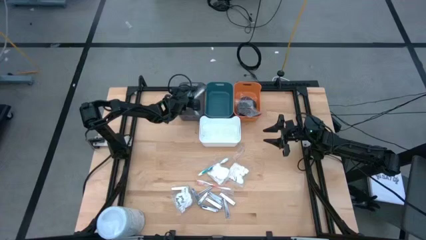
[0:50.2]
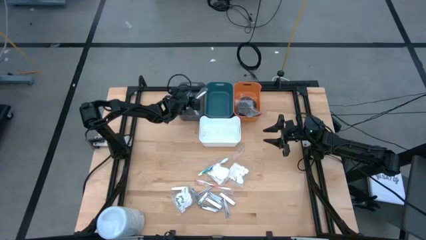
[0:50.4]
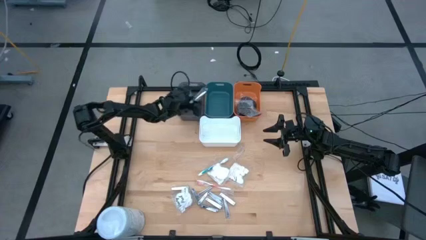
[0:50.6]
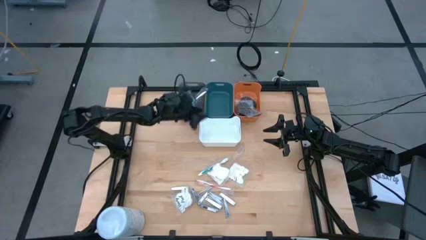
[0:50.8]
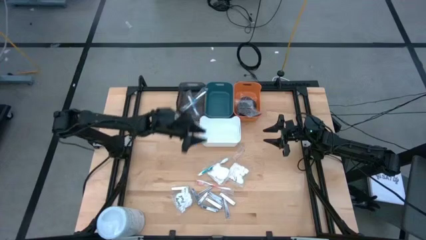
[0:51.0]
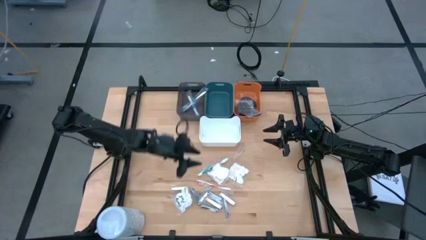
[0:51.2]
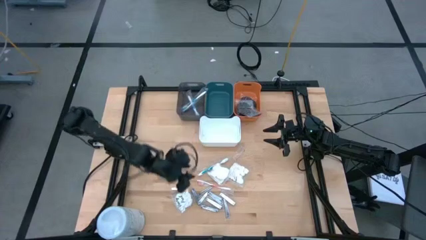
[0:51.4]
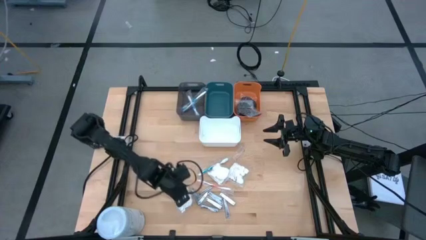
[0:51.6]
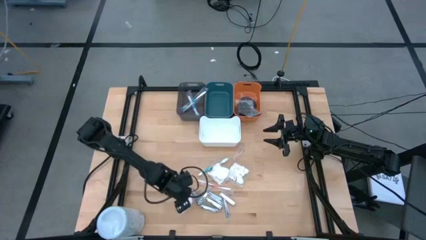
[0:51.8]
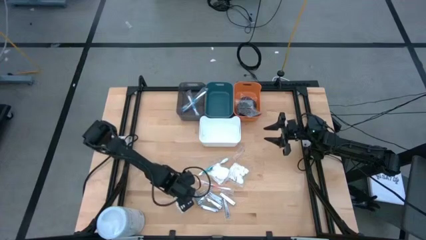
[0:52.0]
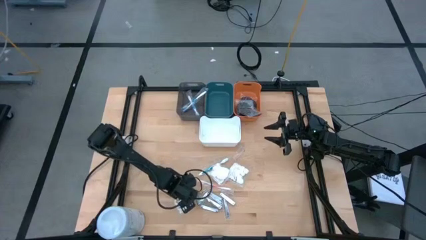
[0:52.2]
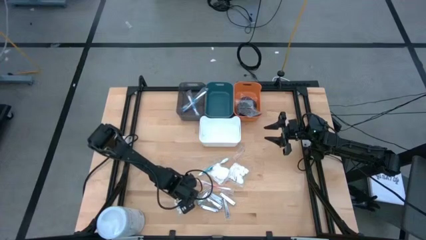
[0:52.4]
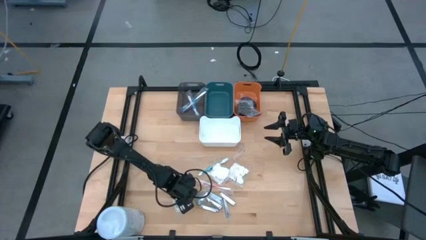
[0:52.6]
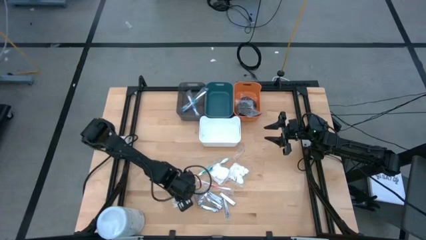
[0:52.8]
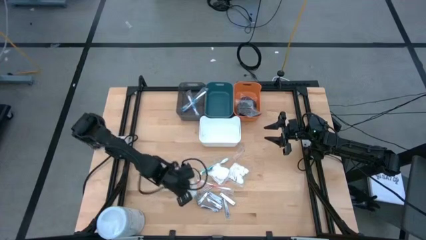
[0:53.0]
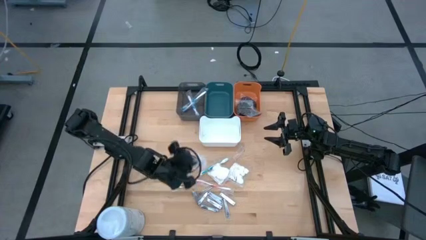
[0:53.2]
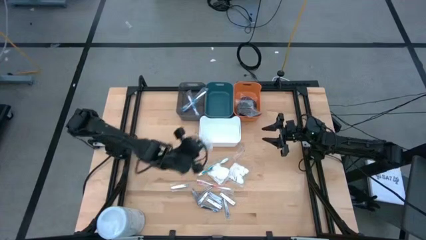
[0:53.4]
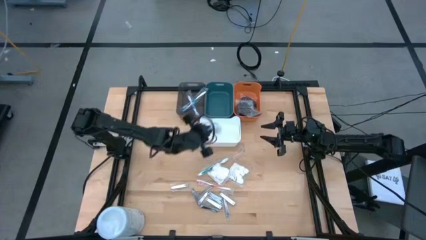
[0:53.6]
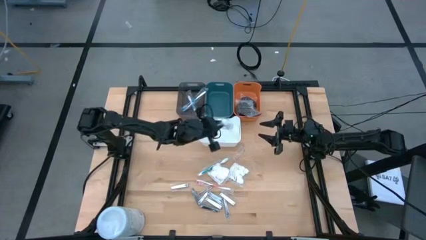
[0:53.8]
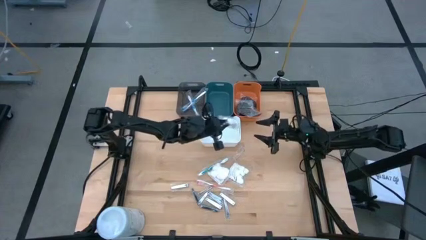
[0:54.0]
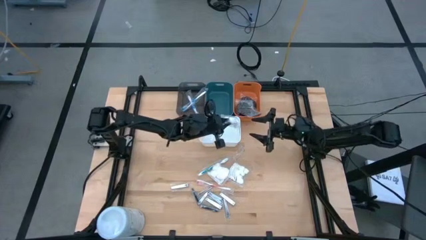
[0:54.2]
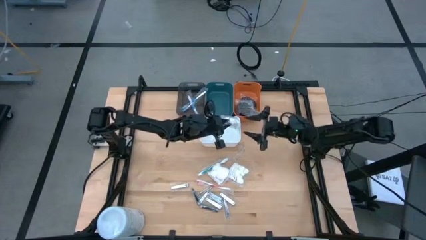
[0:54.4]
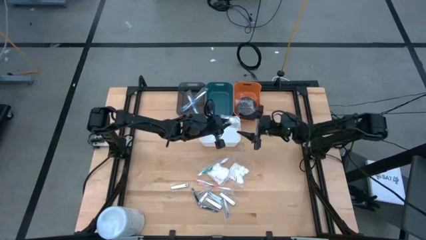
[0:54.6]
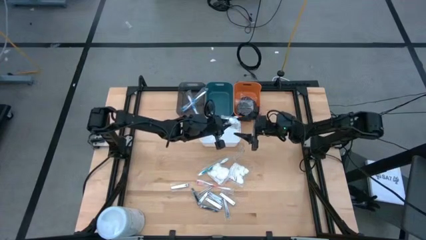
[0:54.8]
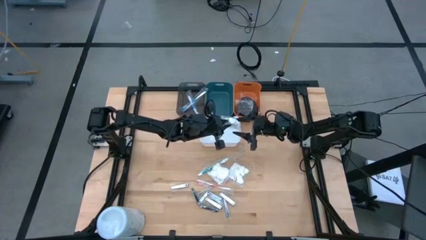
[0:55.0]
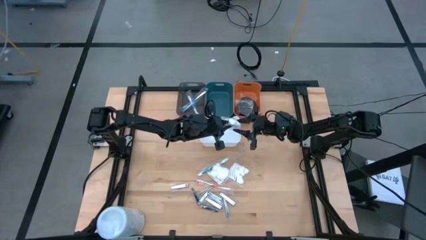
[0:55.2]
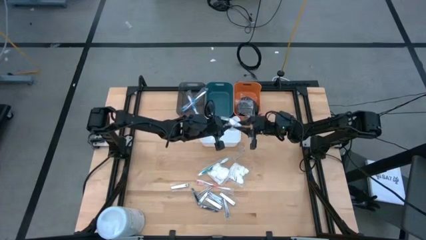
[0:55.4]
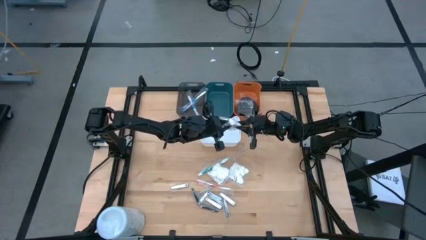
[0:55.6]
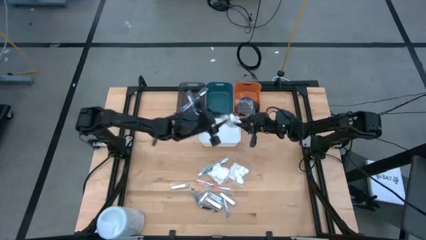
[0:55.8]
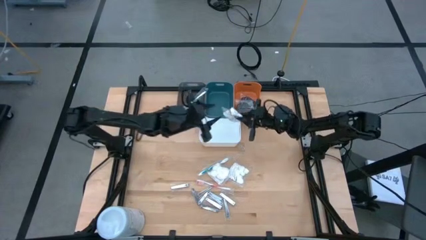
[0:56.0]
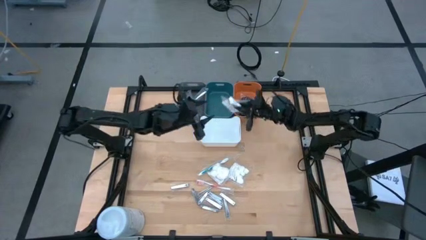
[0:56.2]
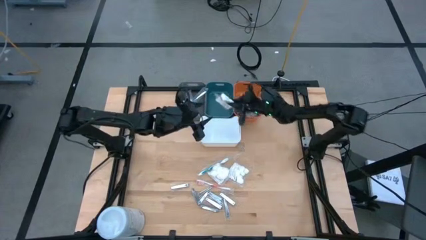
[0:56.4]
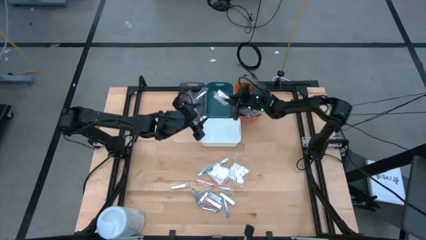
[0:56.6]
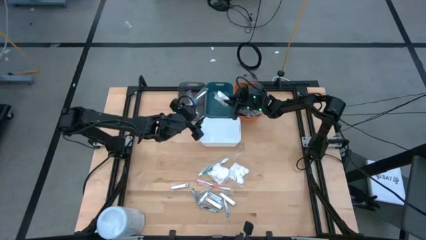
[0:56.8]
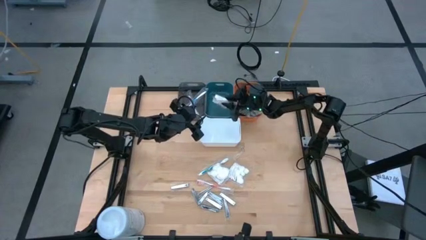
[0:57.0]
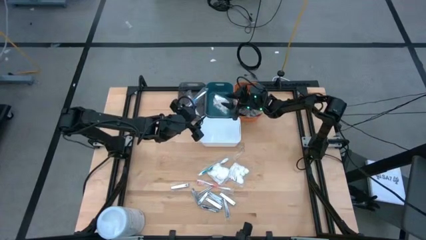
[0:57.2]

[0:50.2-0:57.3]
Task: Pick & Place Travel size toiletries
Put the cotton pack into the blue bin

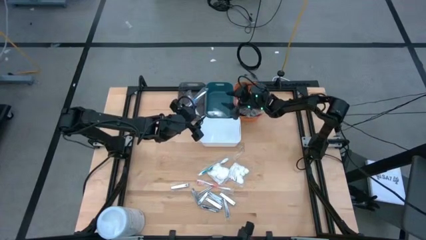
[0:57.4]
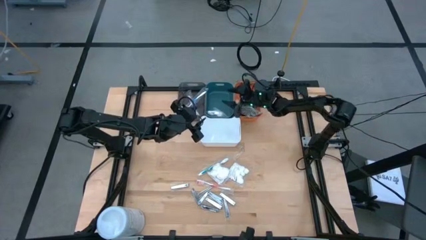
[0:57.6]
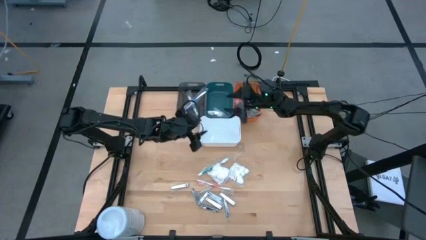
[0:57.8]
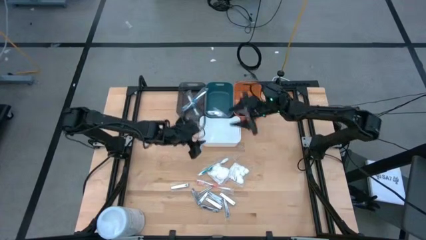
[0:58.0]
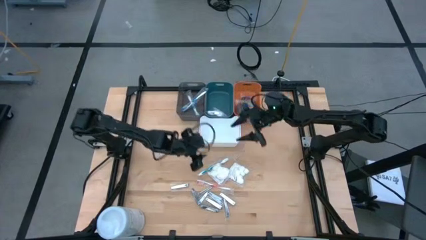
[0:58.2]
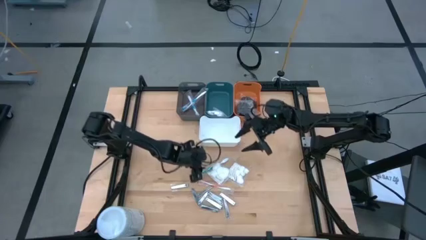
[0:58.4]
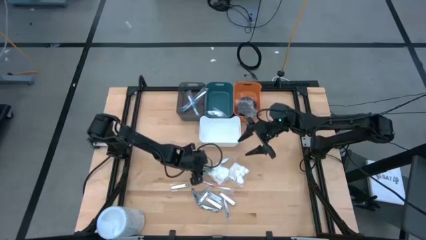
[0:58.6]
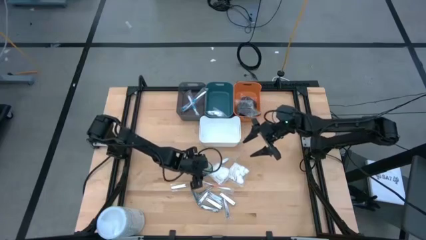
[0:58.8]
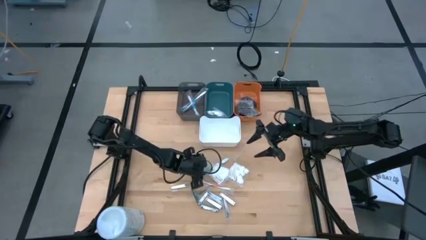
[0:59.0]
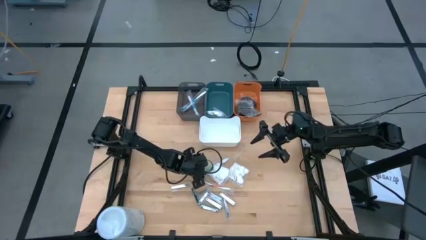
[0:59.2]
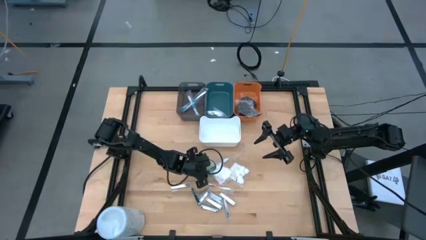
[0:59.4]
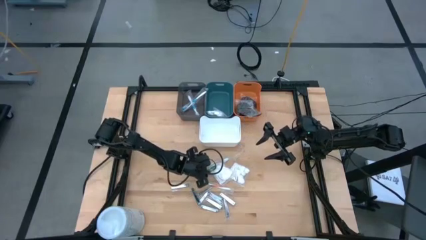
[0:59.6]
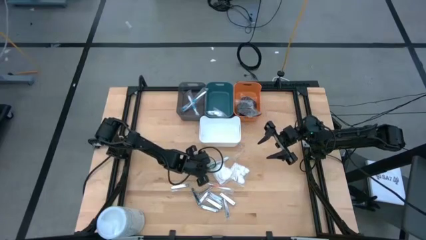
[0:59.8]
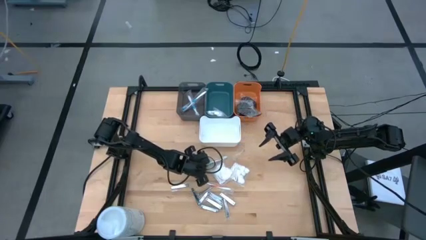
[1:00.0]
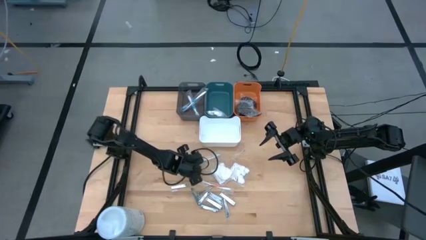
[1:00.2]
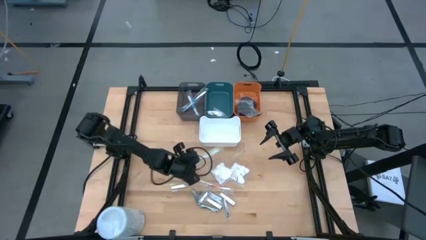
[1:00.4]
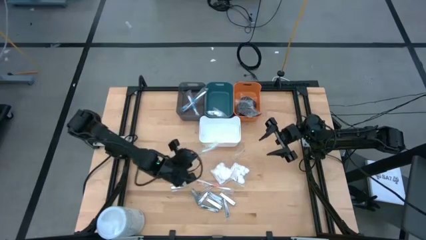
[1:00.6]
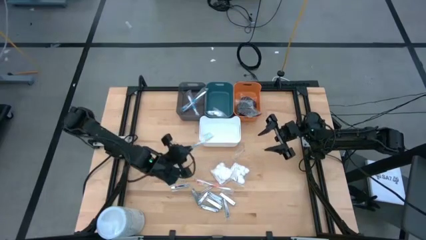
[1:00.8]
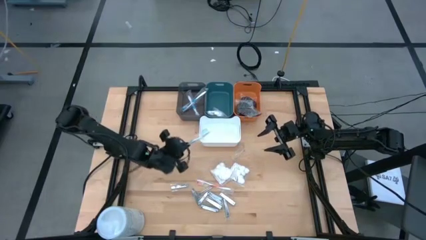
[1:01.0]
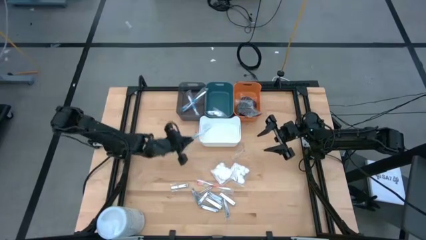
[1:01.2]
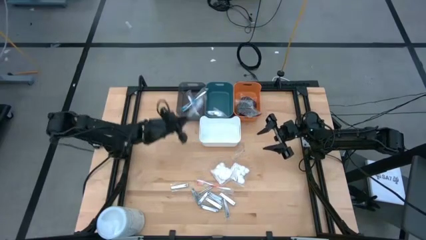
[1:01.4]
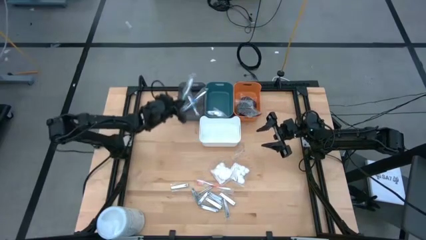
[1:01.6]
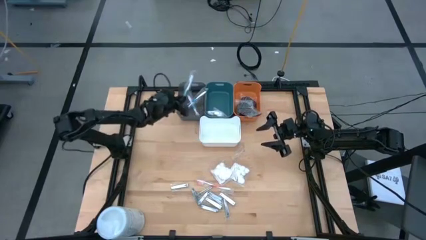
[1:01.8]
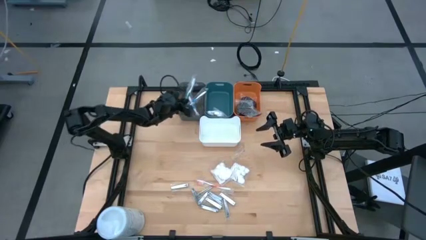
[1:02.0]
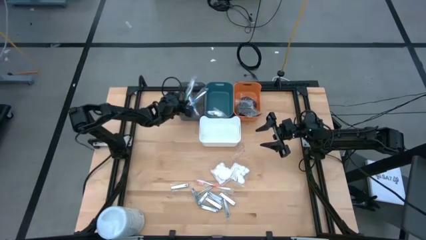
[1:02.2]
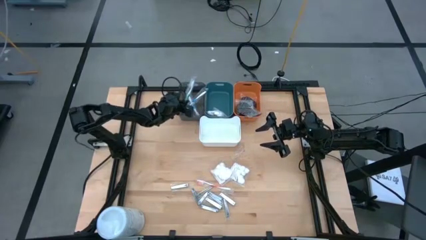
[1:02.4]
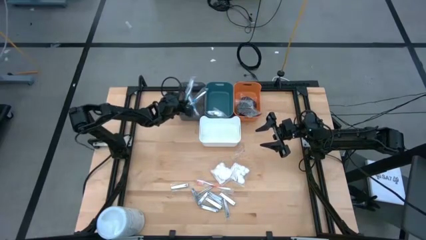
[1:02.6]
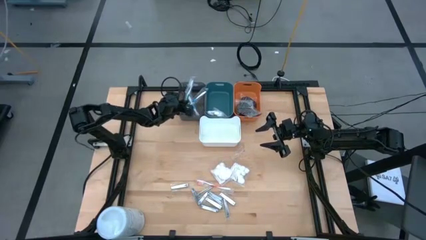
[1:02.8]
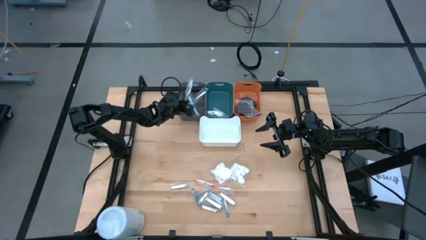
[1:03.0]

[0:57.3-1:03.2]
Put the green toothbrush into the black bin

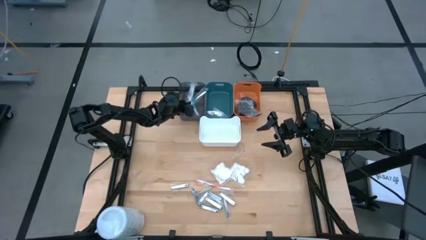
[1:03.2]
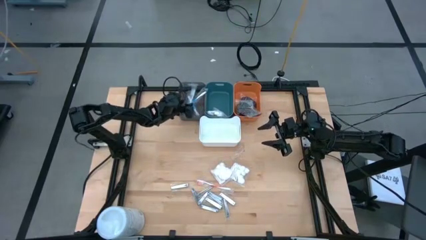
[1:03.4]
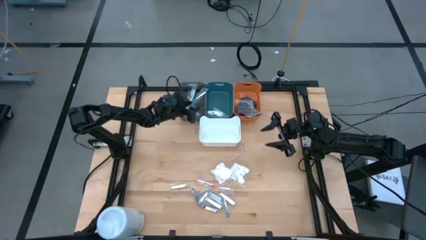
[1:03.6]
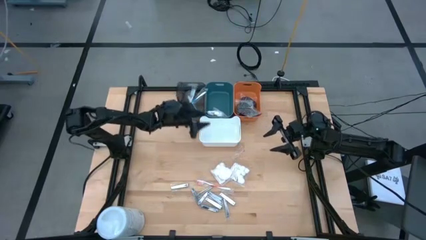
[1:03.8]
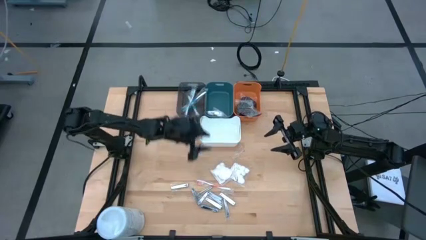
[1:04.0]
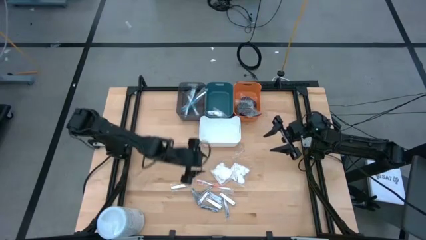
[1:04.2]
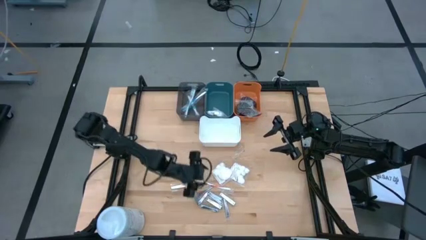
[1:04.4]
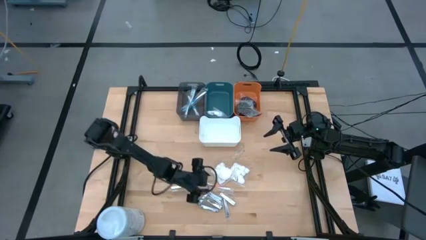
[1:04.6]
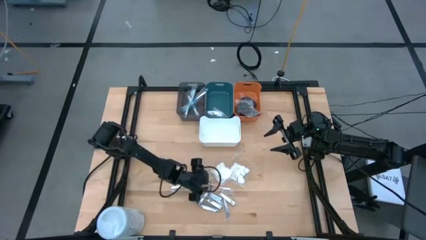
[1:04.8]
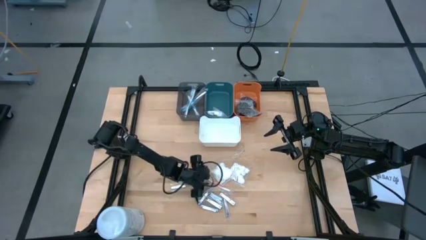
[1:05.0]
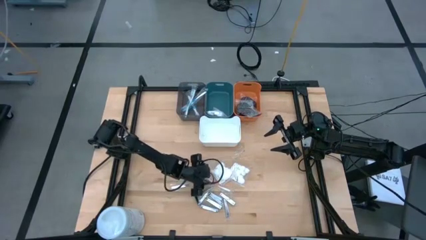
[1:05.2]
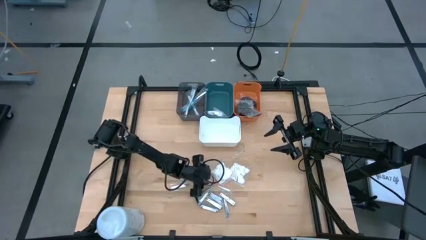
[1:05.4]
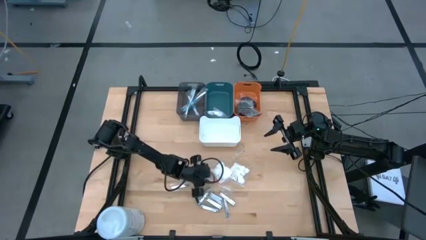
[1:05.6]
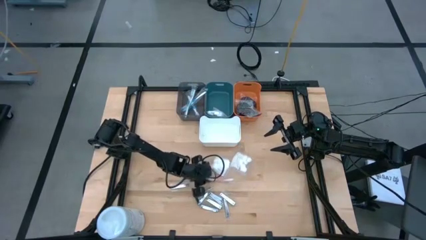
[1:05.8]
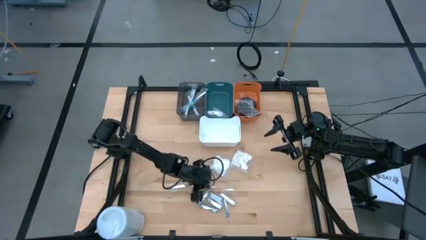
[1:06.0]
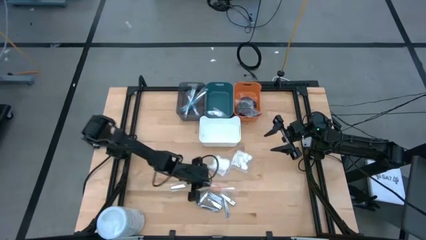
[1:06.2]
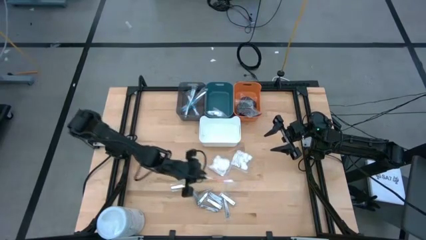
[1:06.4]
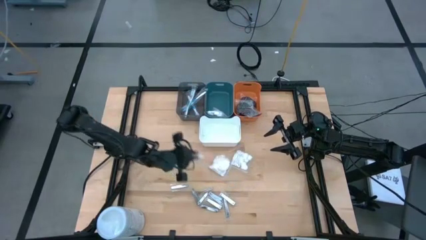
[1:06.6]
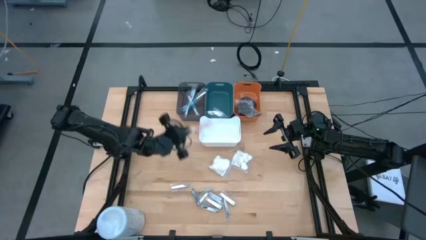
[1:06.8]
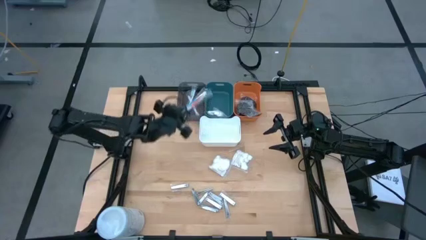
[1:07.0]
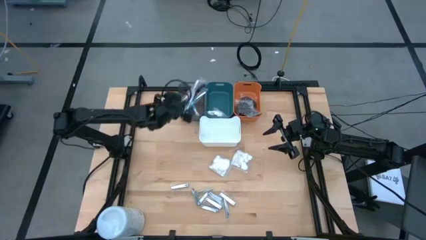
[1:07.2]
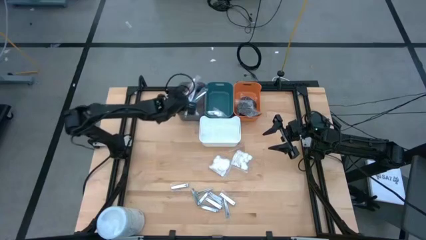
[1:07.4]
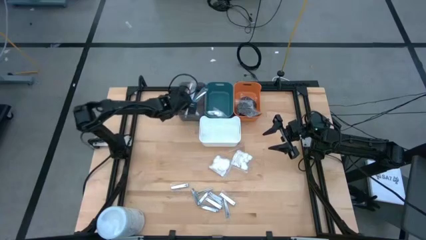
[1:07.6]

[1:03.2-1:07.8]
Put the red toothbrush into the black bin
